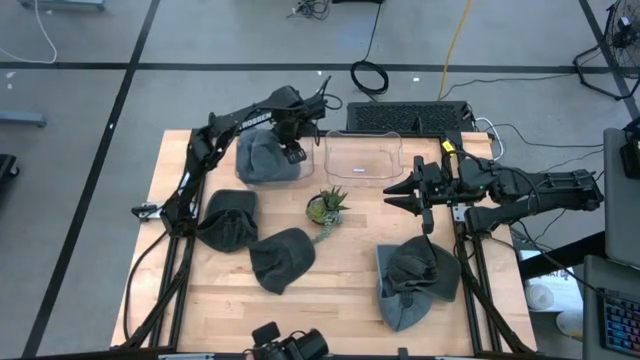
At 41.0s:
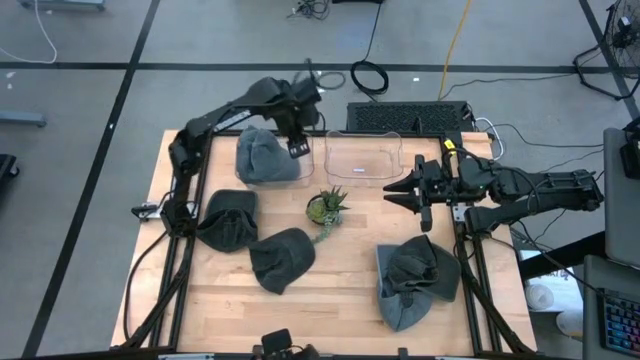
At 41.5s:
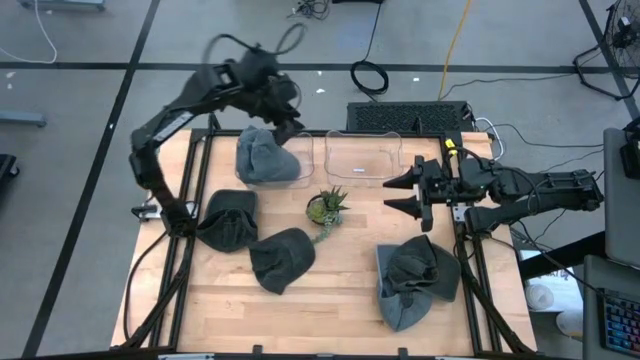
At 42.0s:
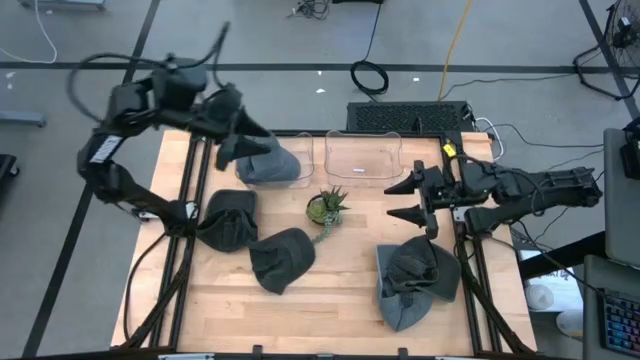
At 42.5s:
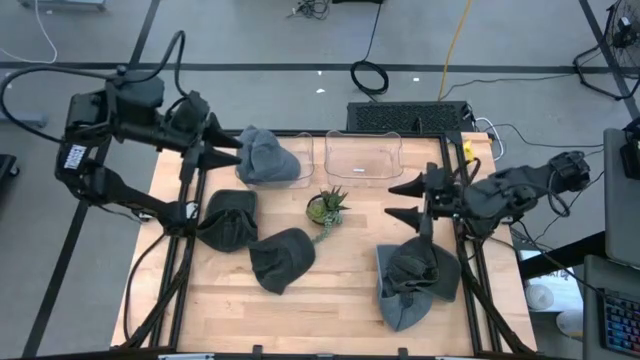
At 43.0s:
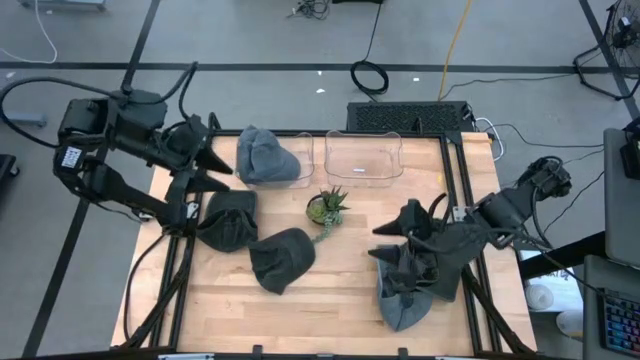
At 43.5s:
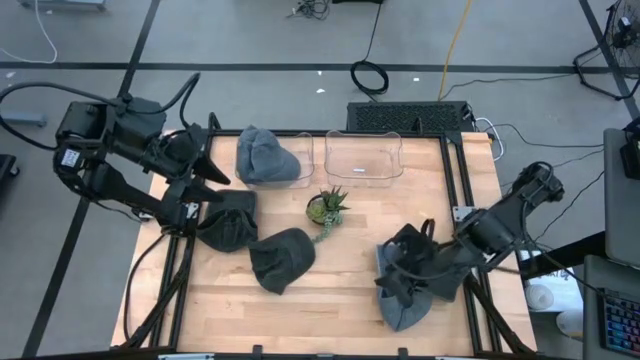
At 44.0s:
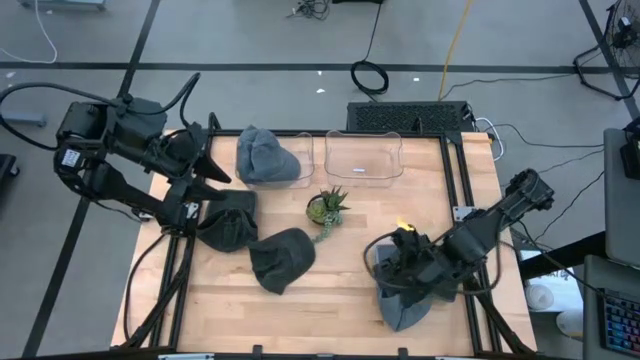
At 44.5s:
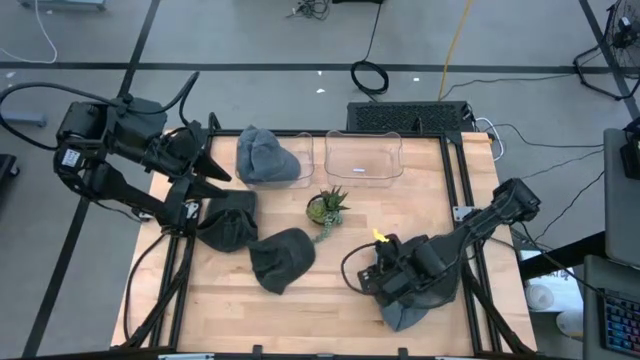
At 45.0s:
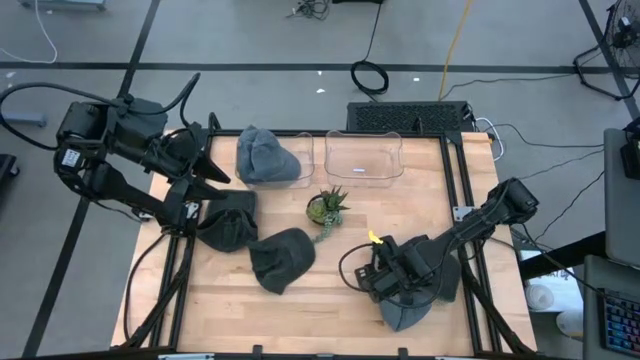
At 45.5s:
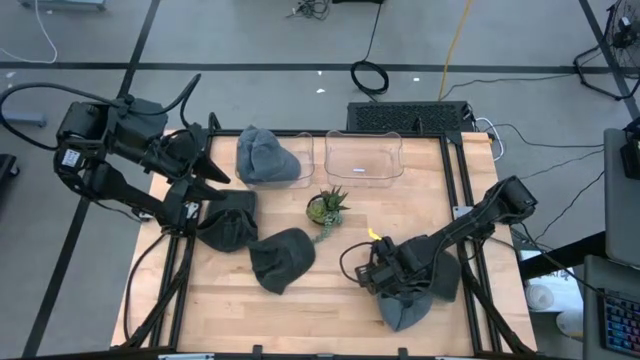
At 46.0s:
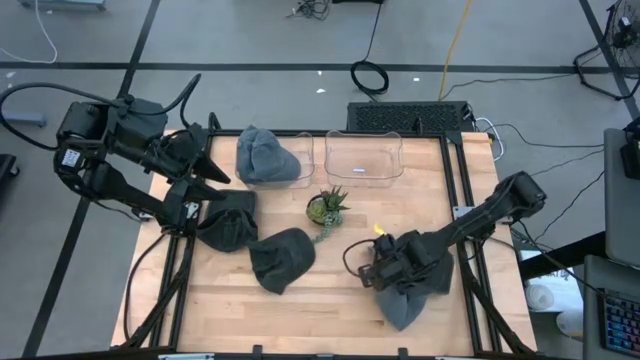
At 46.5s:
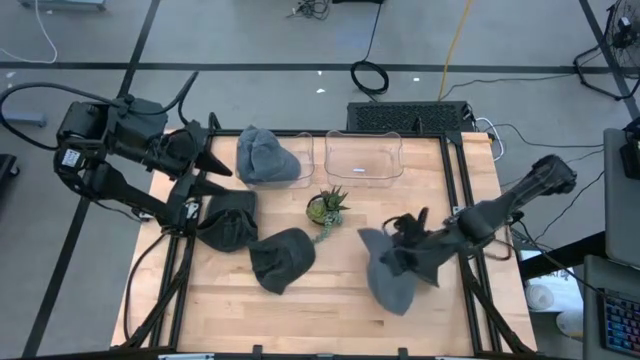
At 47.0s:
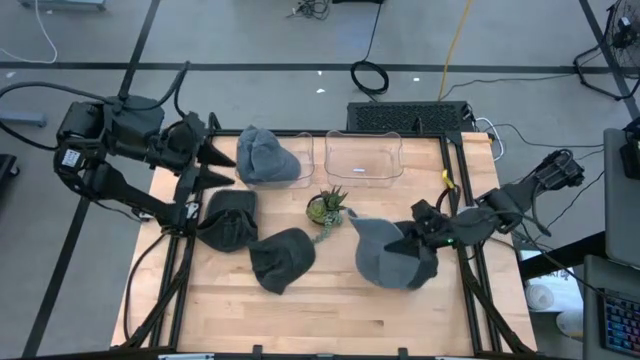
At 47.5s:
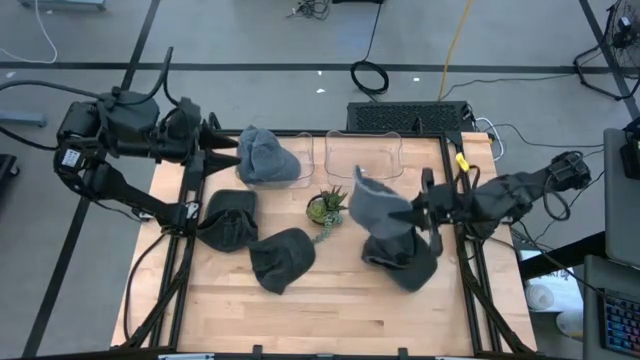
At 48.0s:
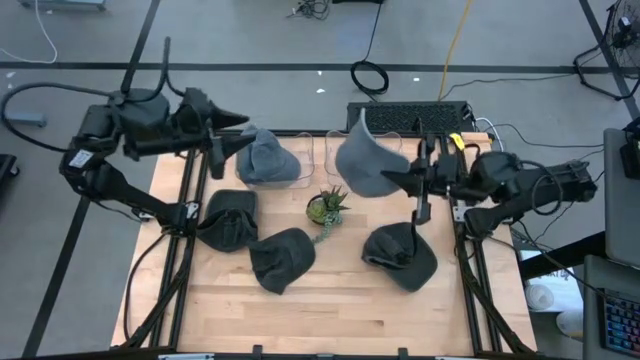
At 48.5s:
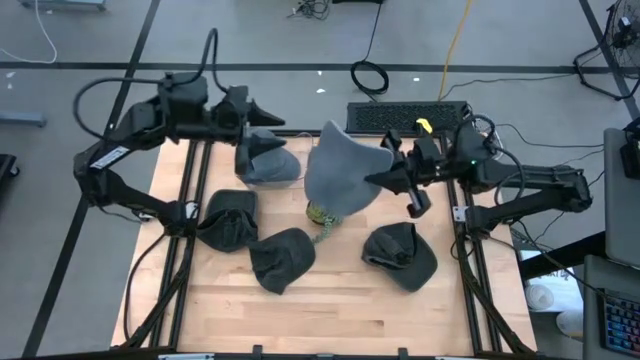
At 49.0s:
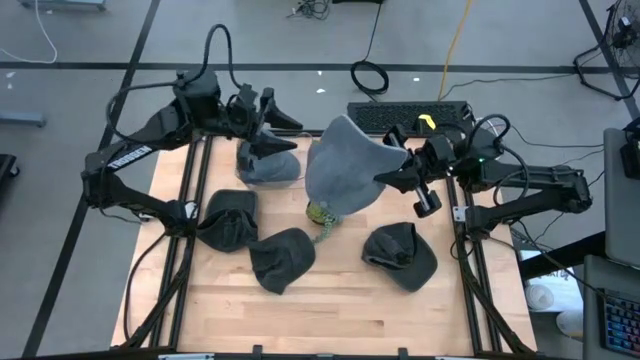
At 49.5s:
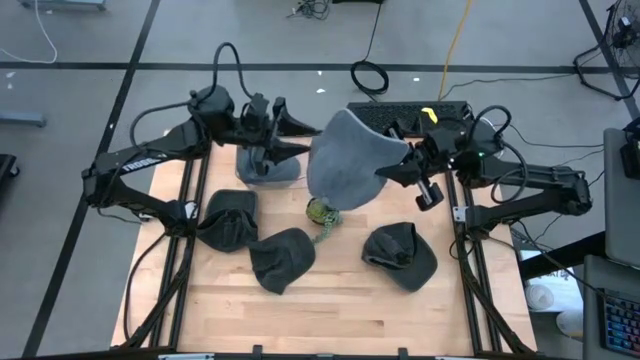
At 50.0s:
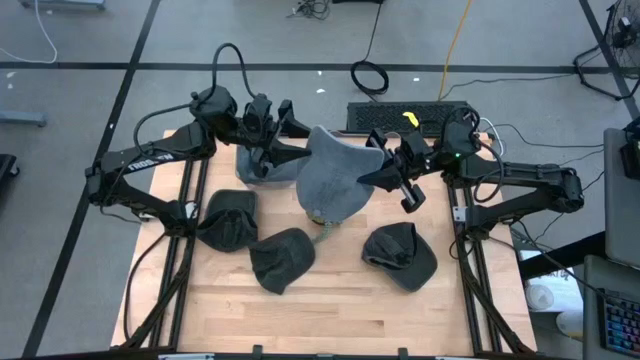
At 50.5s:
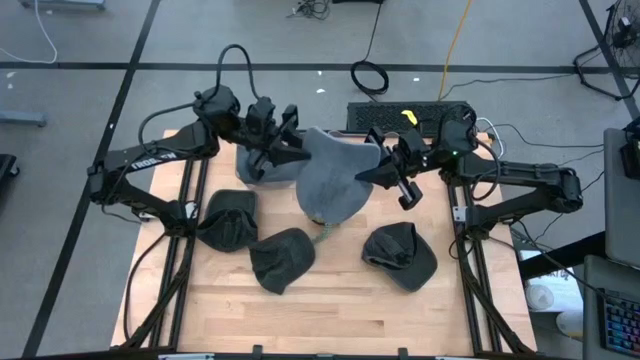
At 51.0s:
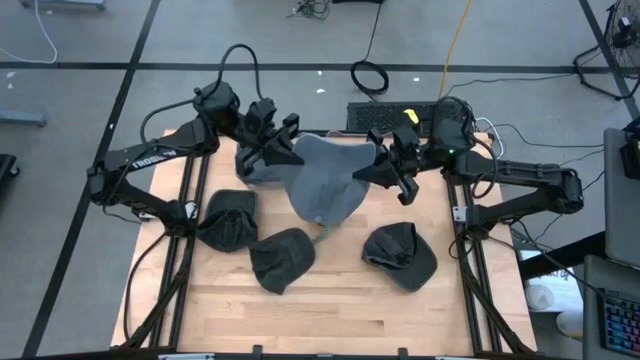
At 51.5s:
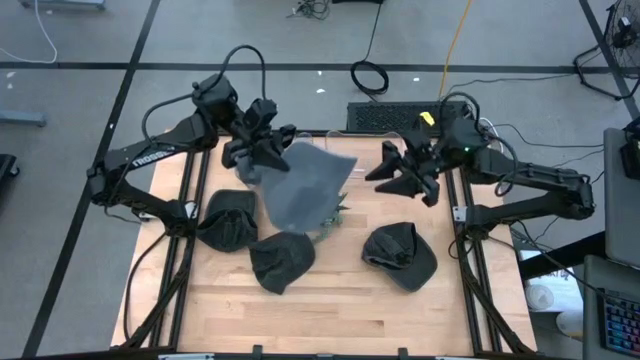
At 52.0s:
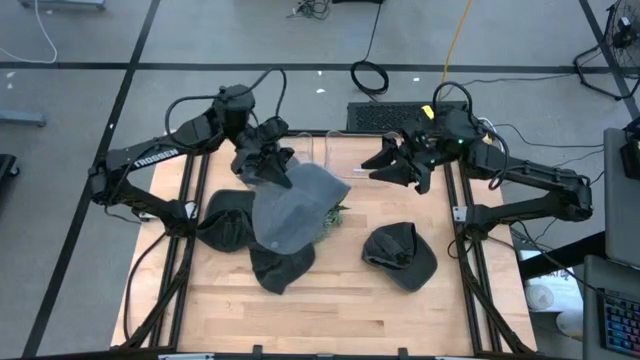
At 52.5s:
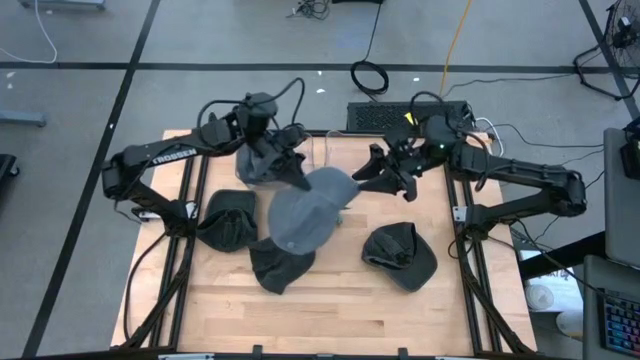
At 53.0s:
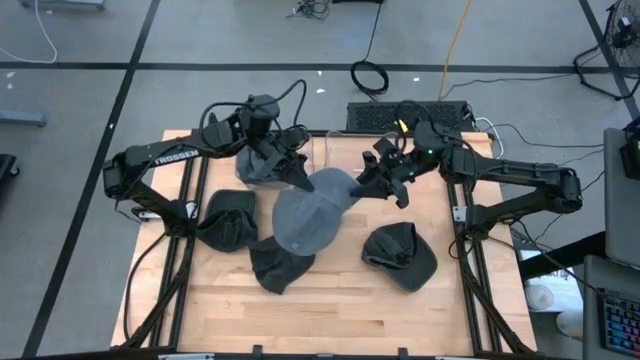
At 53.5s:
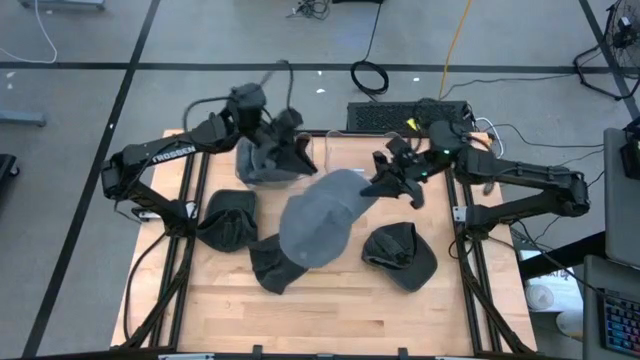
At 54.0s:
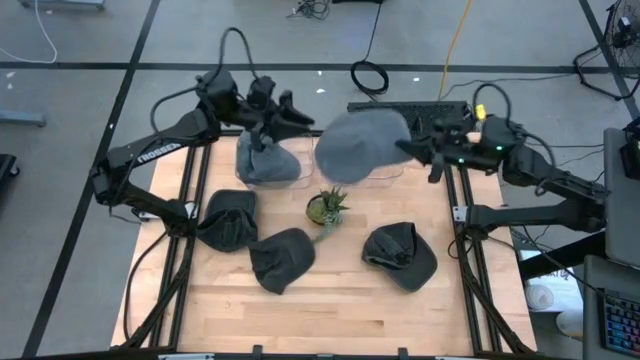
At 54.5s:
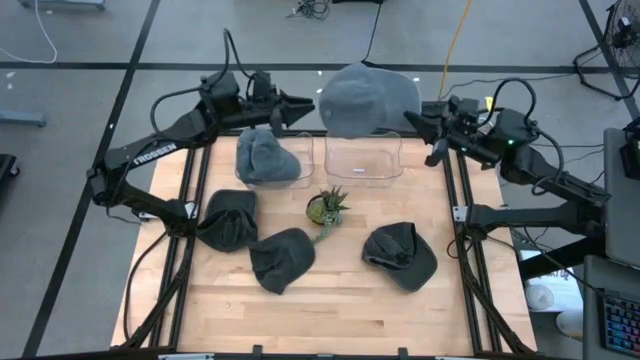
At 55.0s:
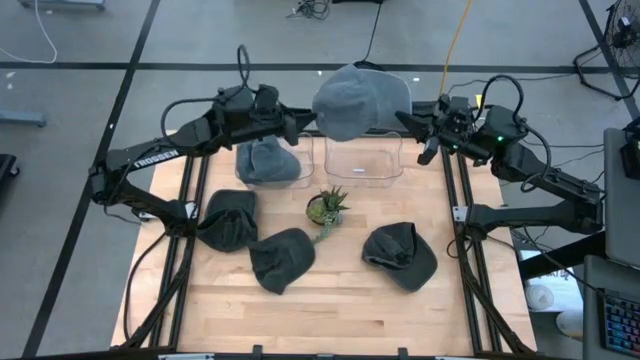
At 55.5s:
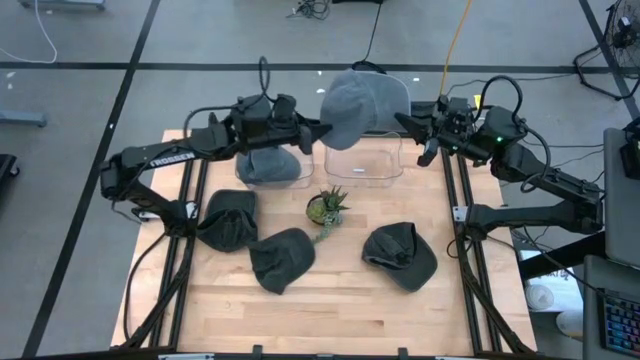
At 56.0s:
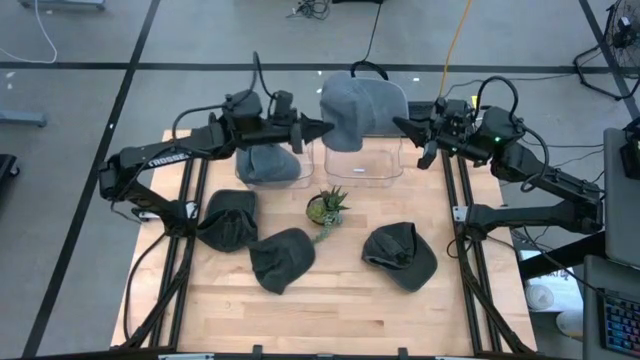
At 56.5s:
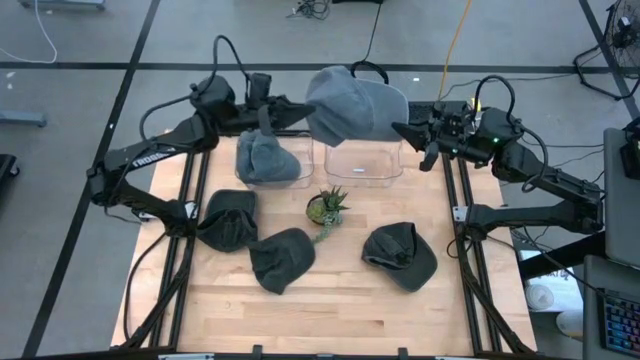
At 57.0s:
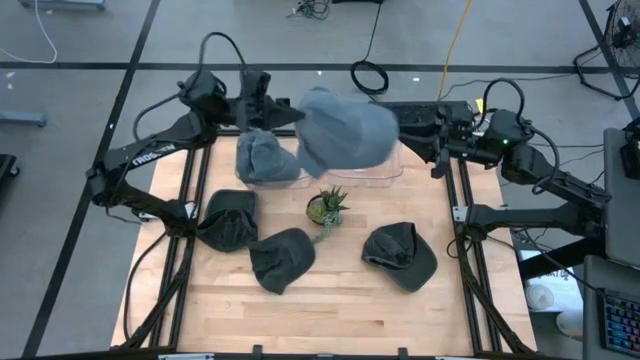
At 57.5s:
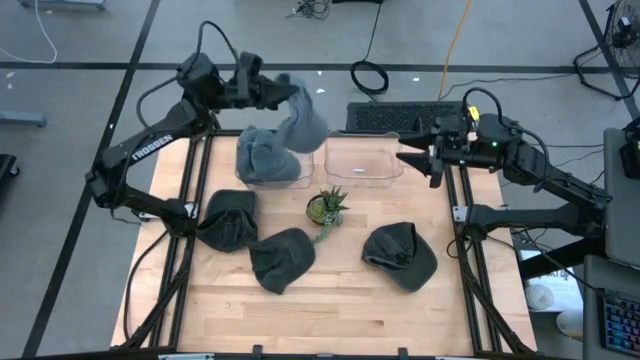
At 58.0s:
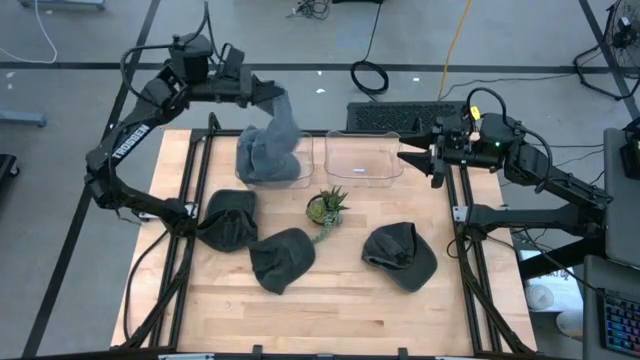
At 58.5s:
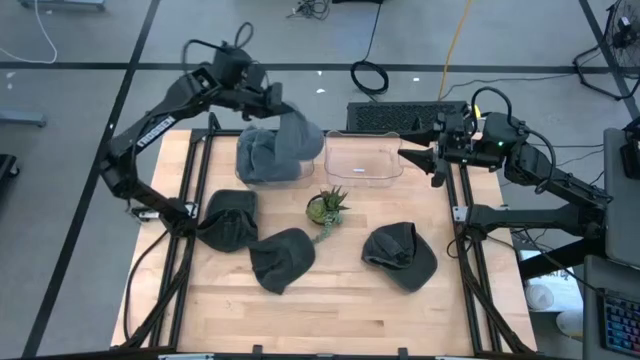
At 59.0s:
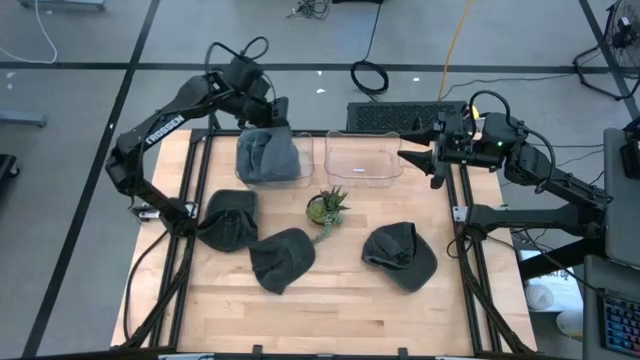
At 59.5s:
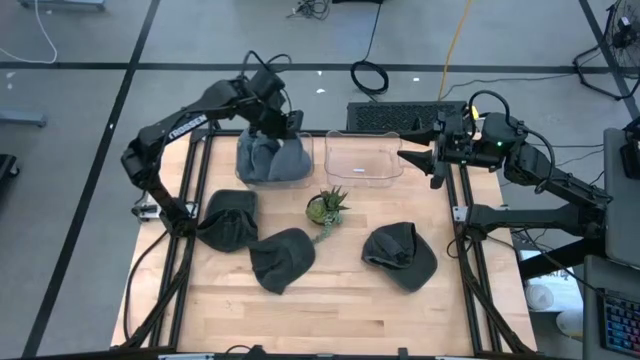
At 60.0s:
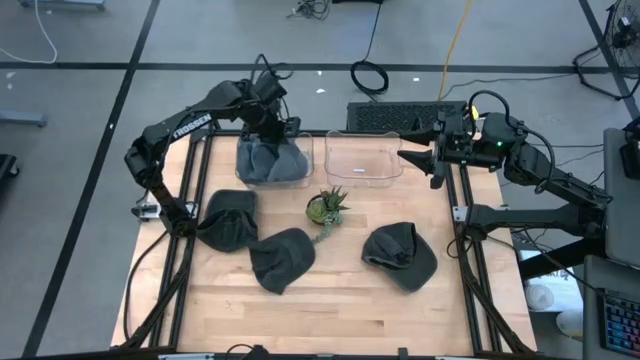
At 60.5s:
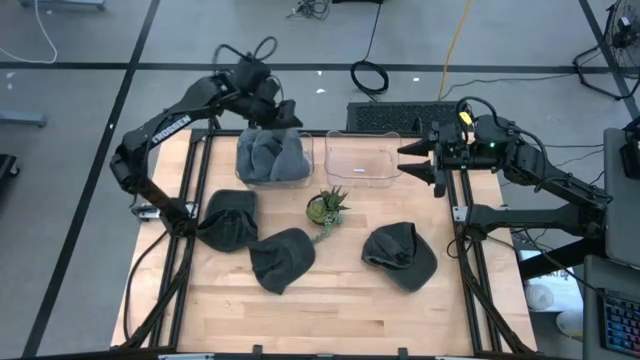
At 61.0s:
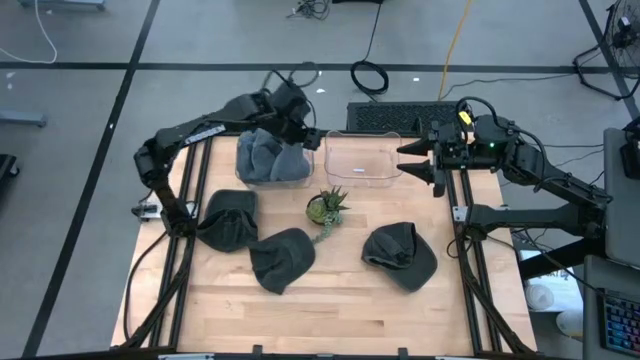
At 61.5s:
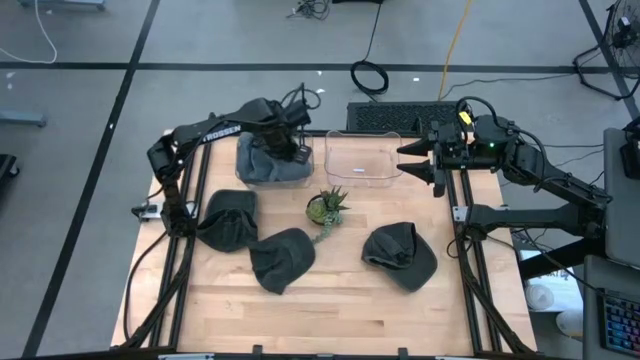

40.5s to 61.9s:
Task: Pick & Place hat
Put the gray cap into the left transparent bin
